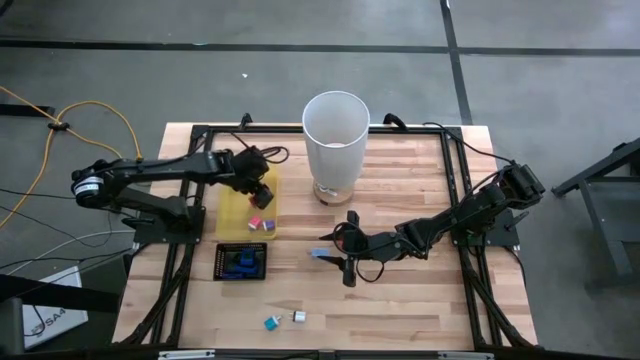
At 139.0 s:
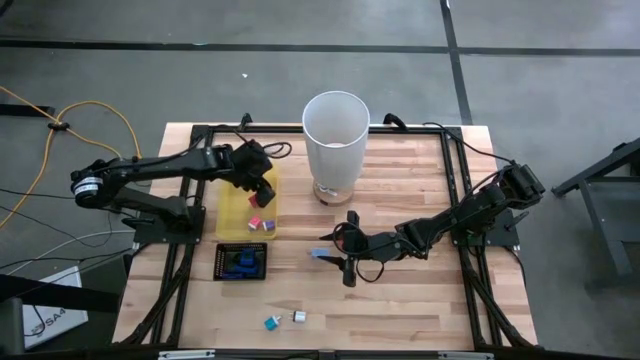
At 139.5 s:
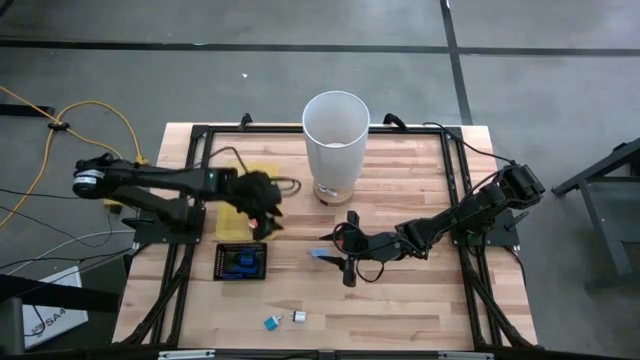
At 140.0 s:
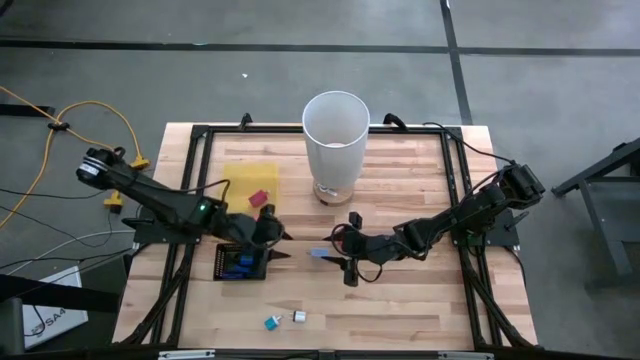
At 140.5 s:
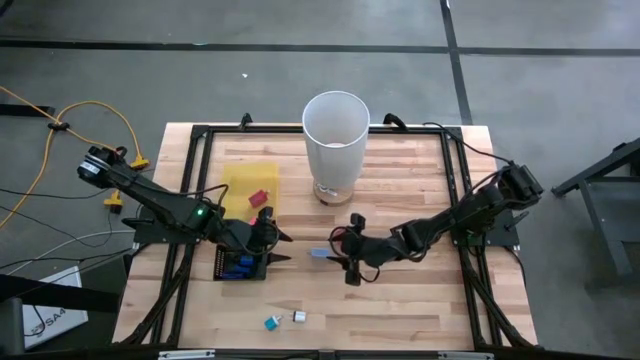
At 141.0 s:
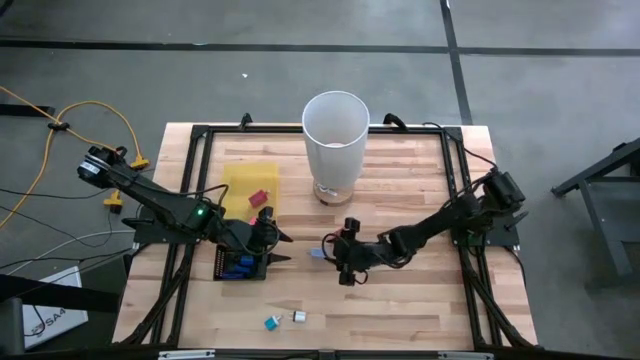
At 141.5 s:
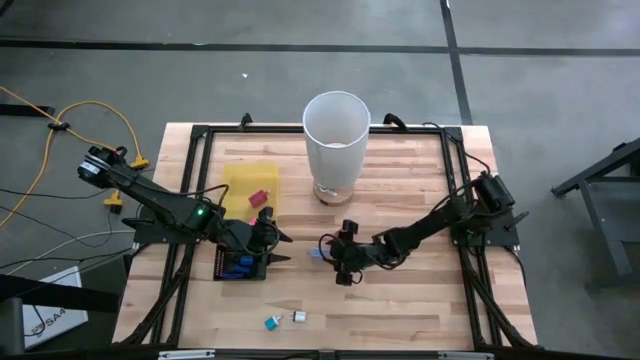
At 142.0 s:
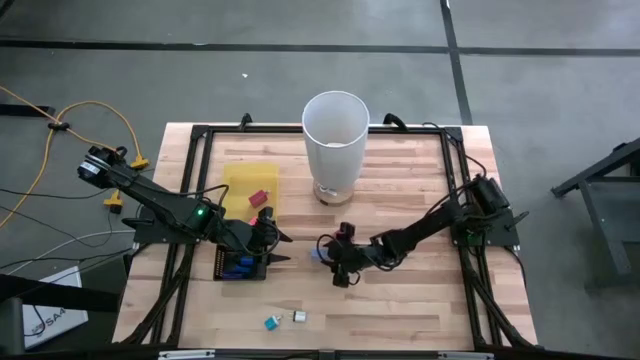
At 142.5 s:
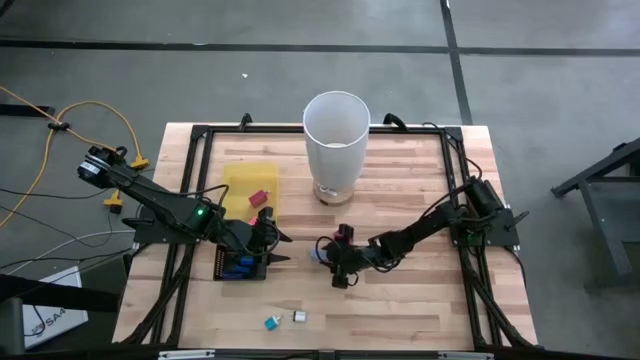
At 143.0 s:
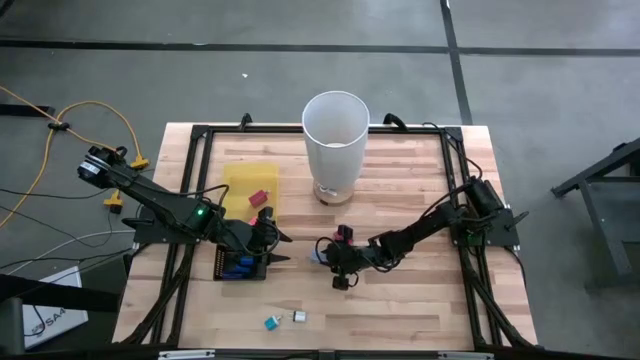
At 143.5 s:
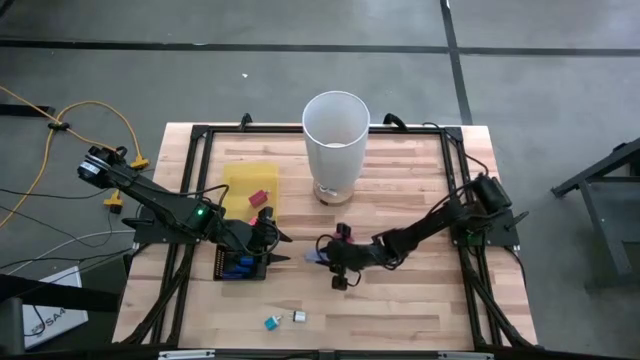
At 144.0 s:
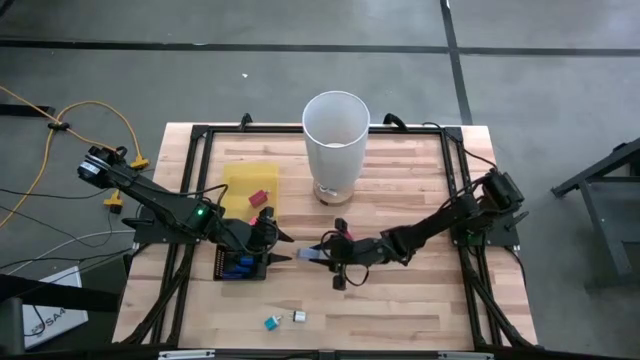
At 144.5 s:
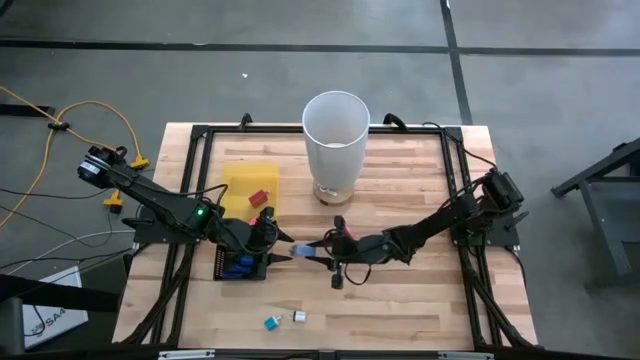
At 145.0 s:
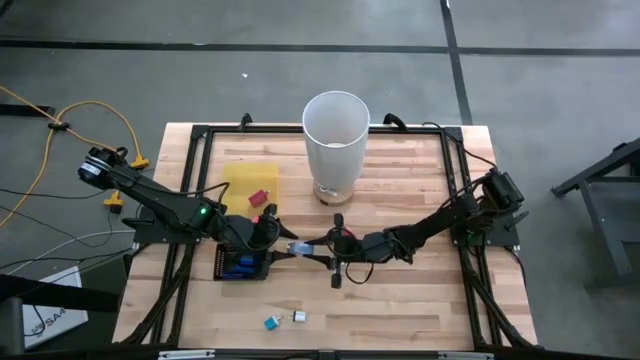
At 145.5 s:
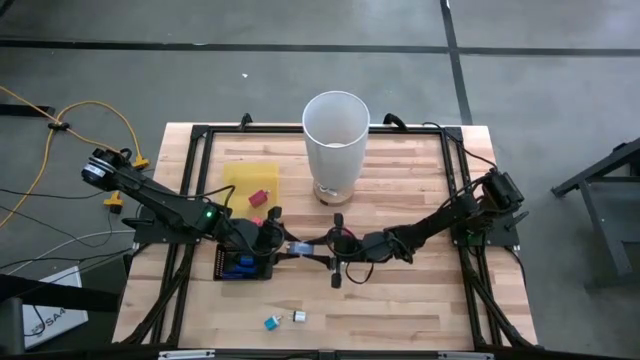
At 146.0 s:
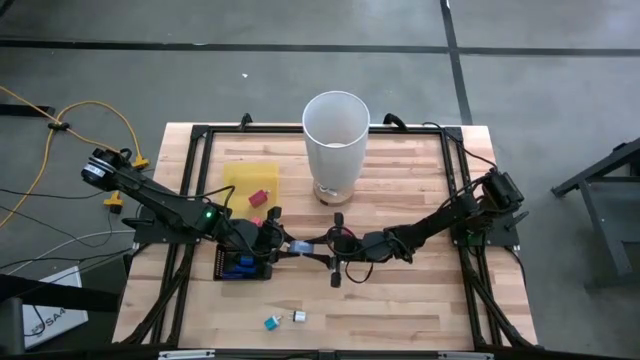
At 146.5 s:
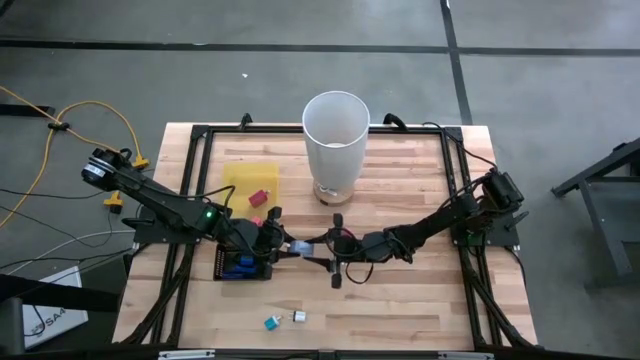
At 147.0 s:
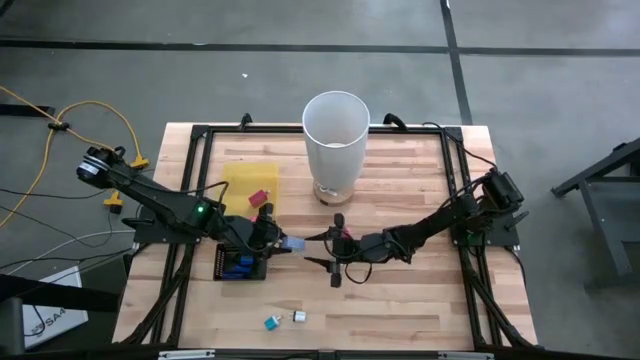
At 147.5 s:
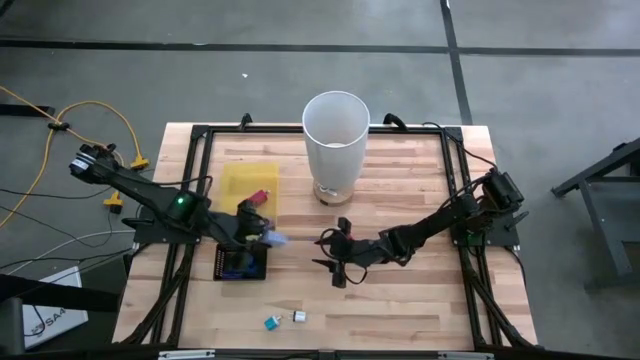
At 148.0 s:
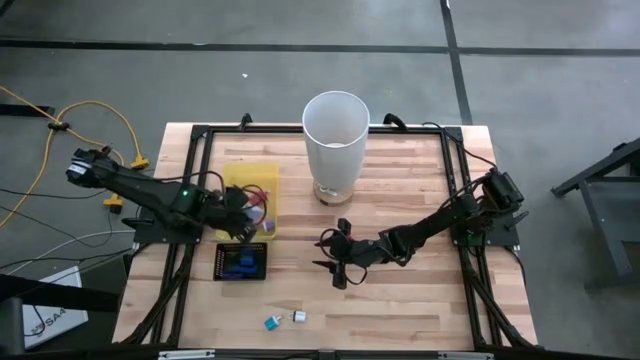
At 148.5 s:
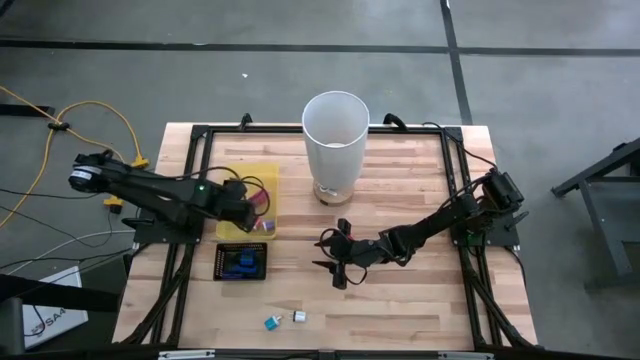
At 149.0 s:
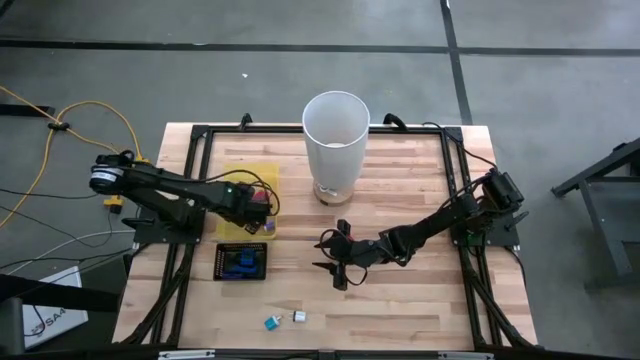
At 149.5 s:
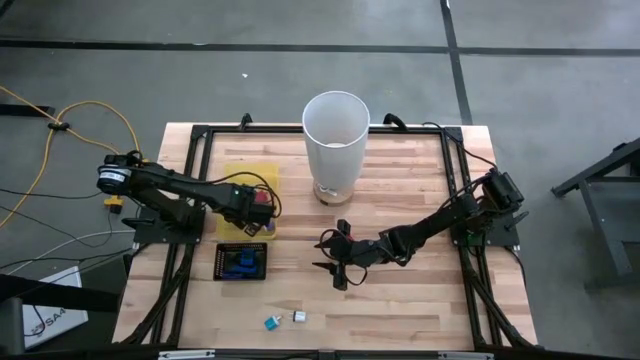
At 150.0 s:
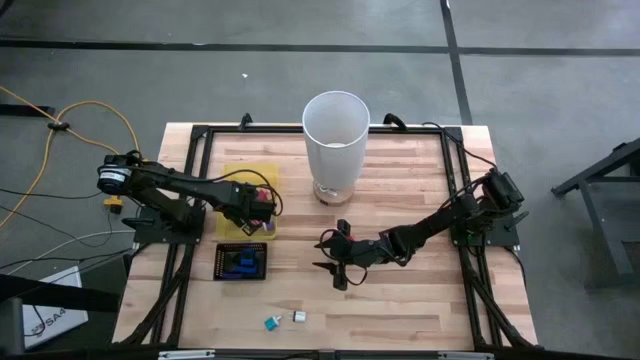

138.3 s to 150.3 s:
Task: Pick & Place Office items
Put the light blue charger into the yellow bin

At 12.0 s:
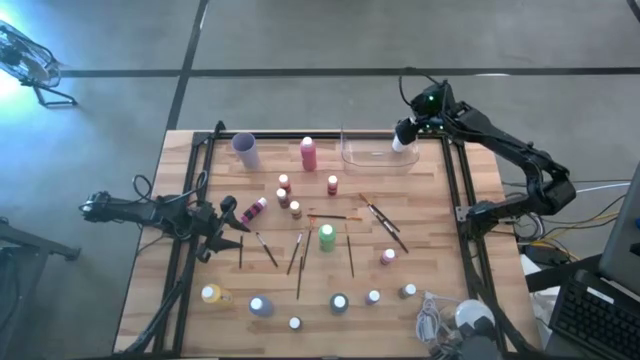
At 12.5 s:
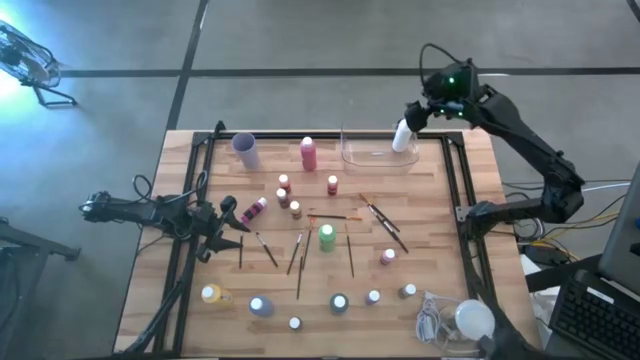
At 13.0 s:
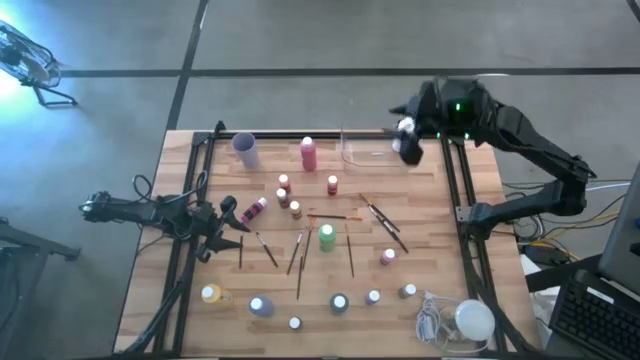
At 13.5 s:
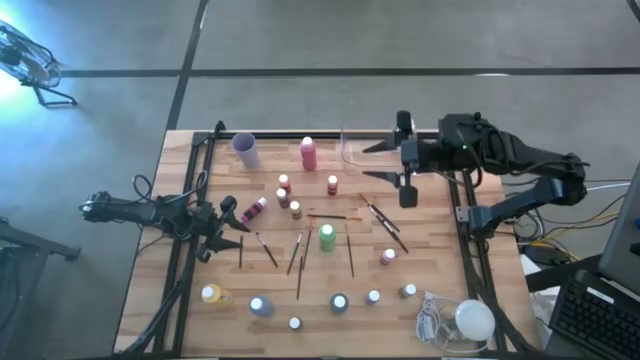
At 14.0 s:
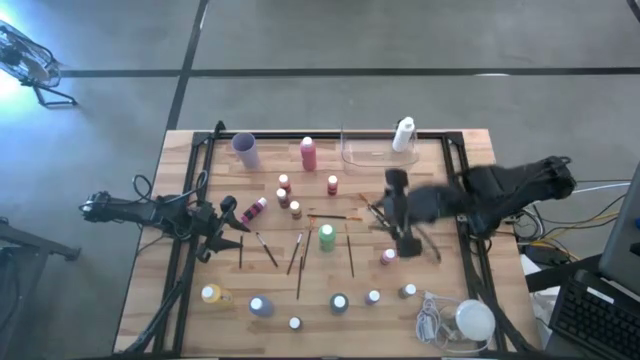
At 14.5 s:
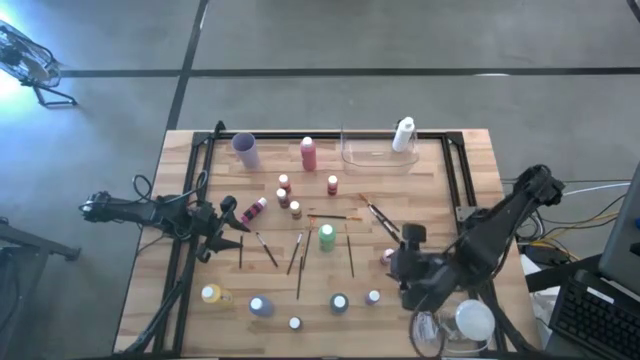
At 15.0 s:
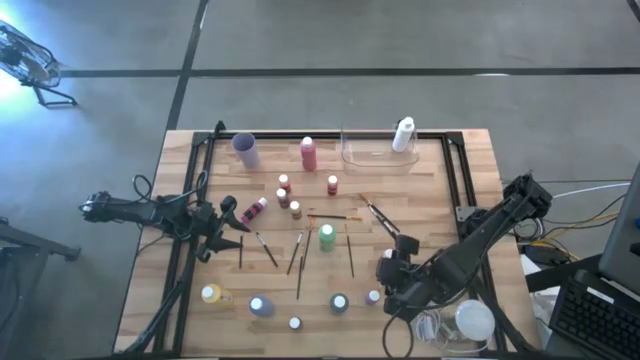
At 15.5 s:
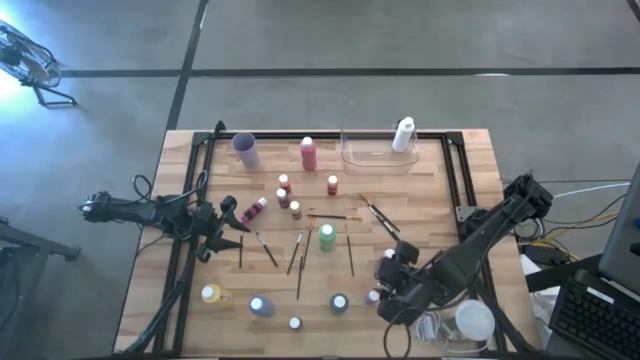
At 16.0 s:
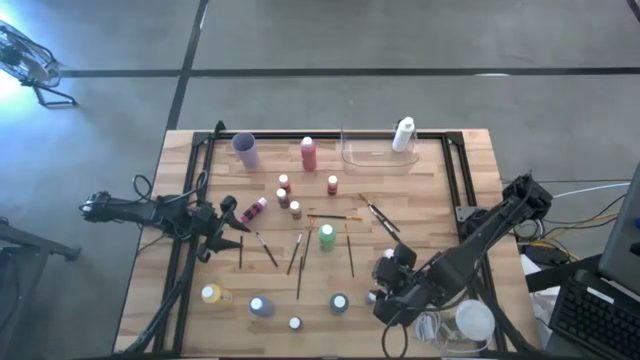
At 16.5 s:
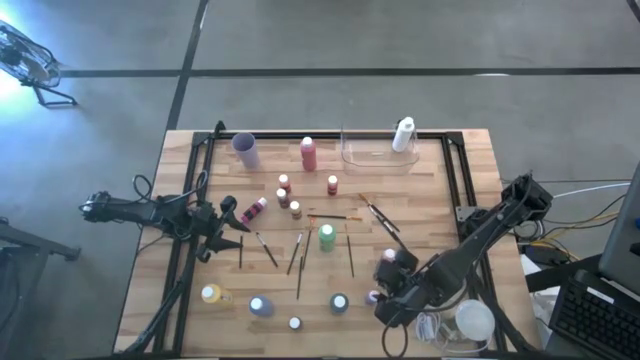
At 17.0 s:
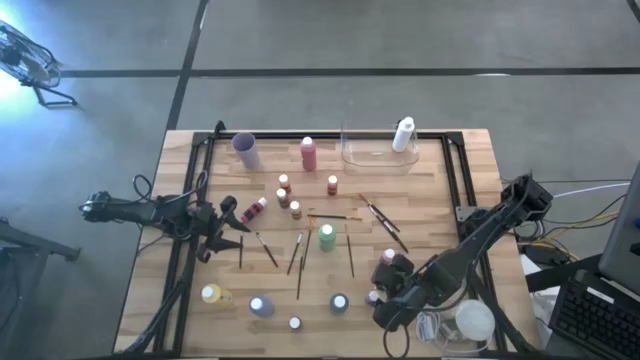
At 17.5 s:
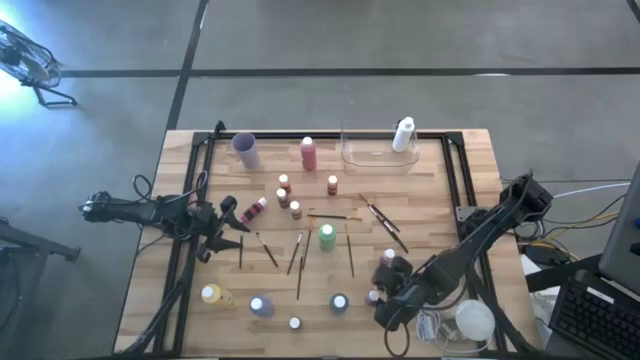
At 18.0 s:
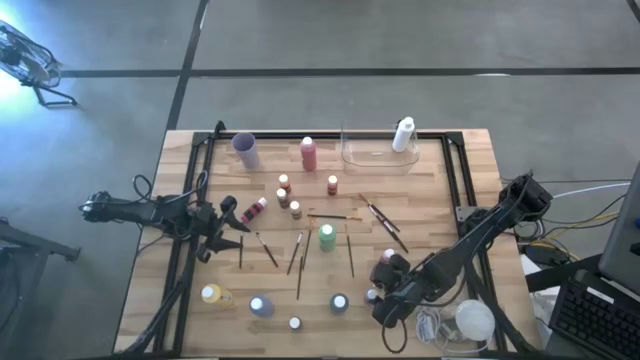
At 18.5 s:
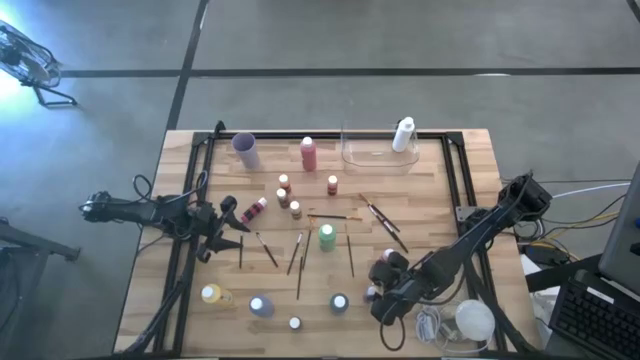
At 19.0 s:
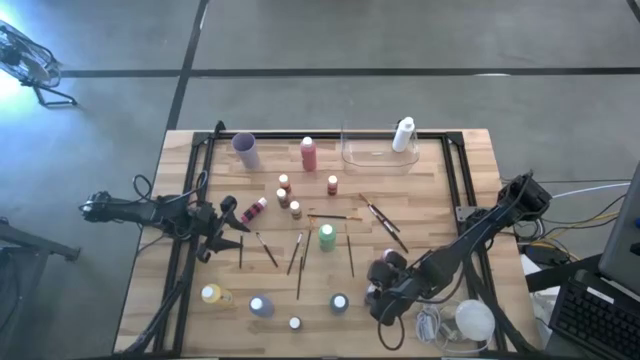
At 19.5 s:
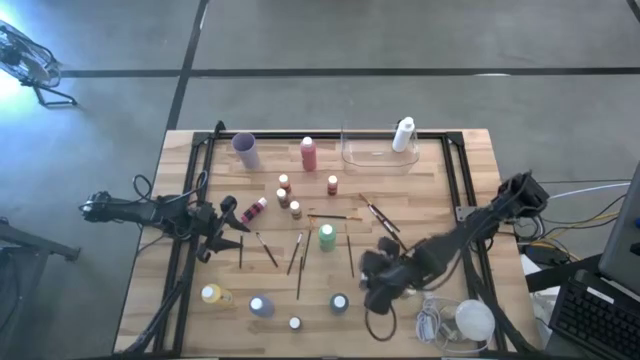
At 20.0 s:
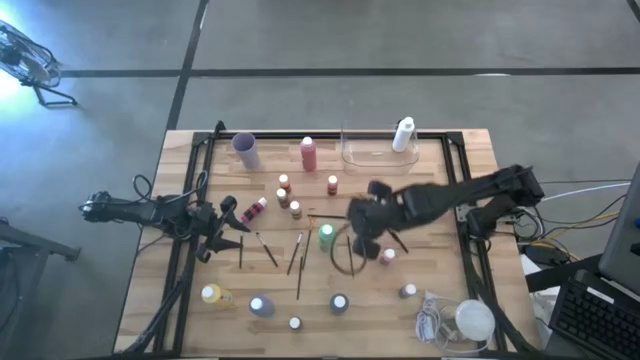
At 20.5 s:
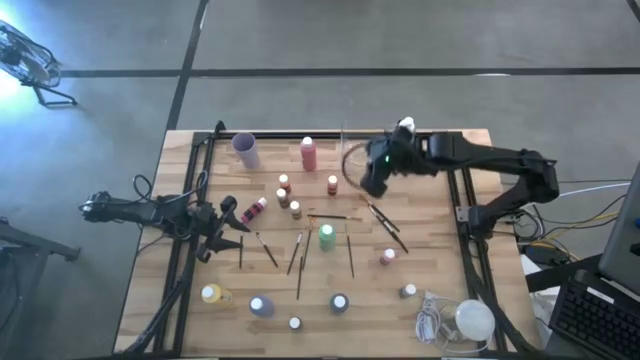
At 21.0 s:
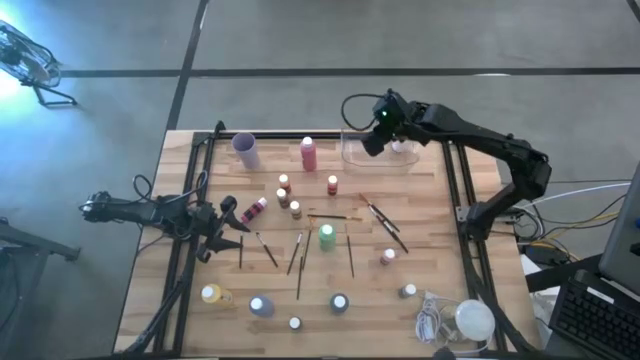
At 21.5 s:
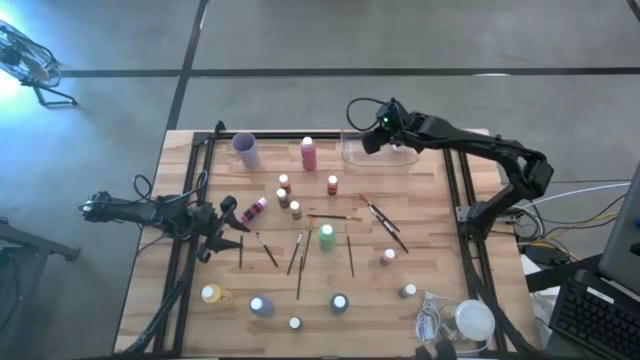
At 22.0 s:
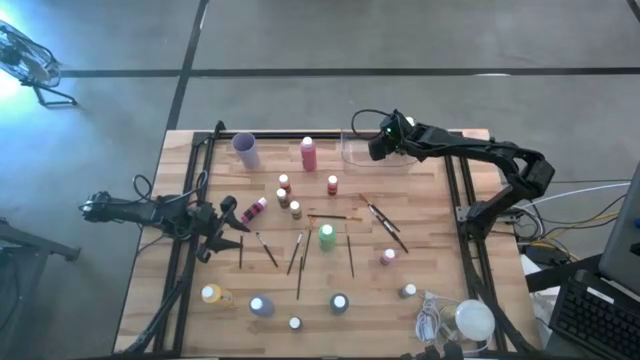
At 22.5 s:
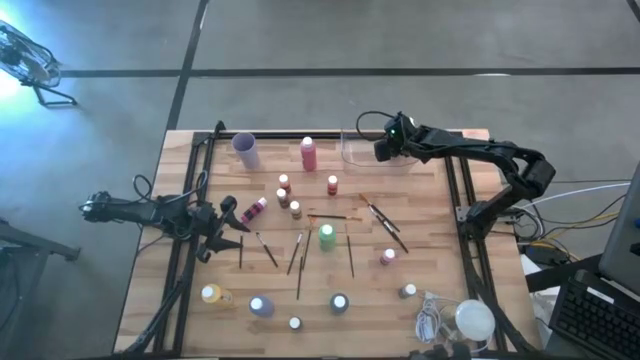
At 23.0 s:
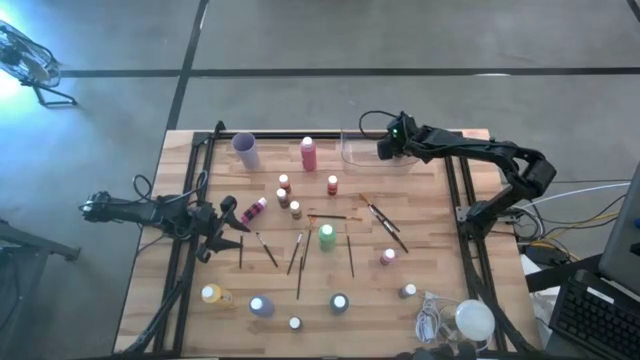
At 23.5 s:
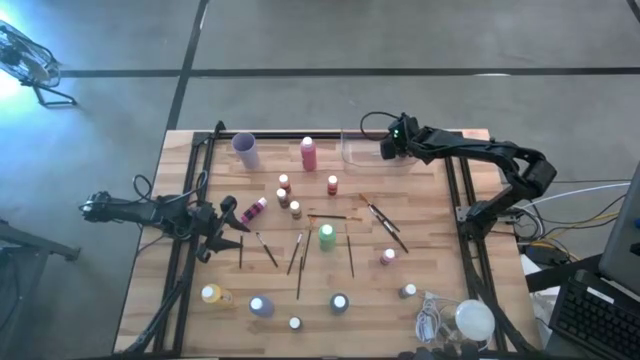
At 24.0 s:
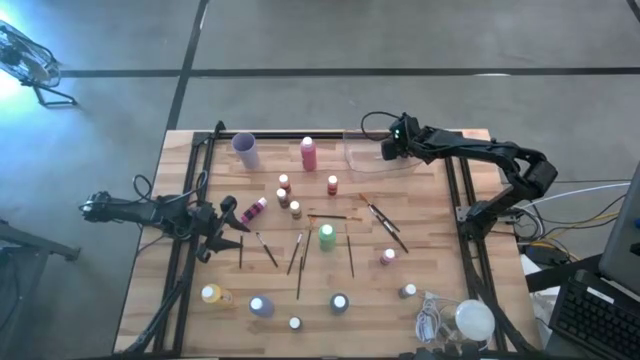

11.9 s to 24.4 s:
Task: Pick & Place Paint Supplies
Put the violet paint bottle into the transparent bin
